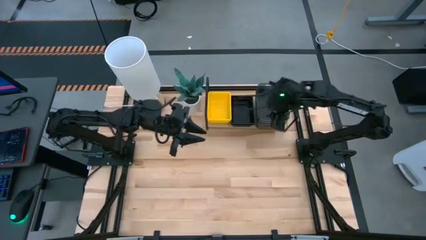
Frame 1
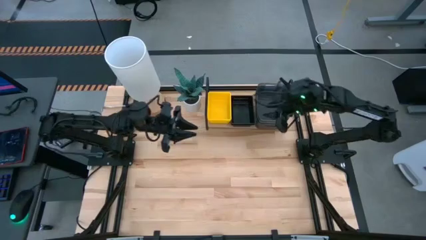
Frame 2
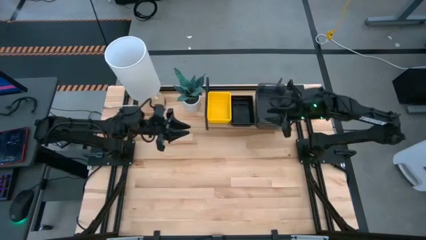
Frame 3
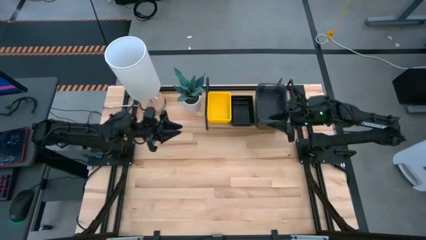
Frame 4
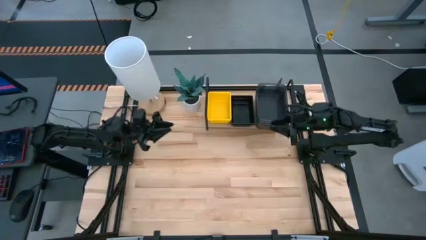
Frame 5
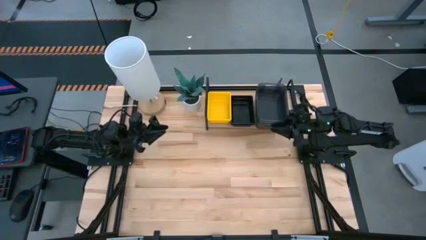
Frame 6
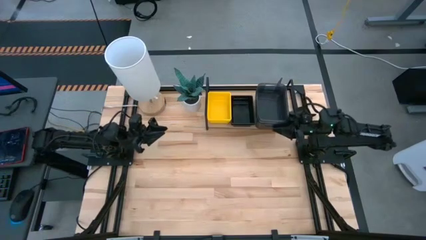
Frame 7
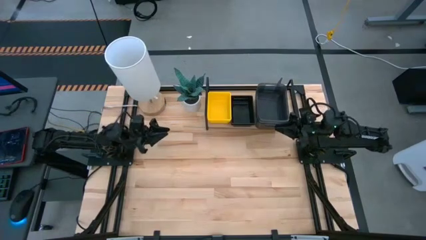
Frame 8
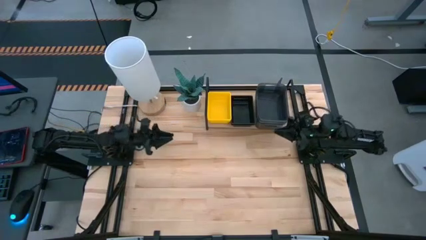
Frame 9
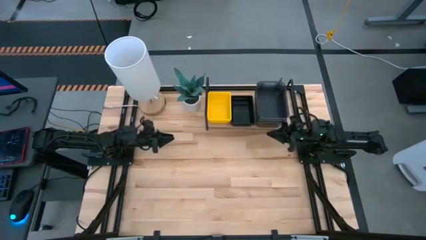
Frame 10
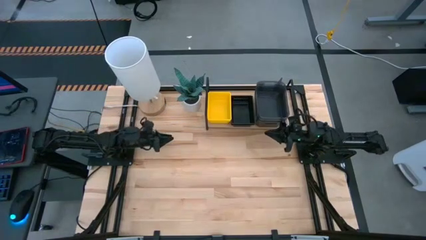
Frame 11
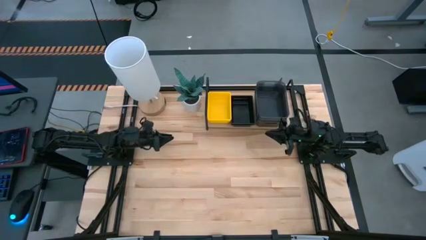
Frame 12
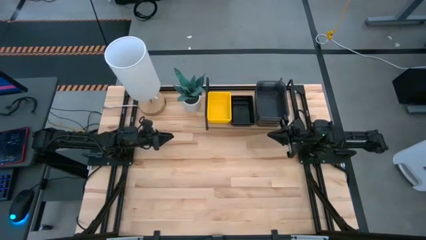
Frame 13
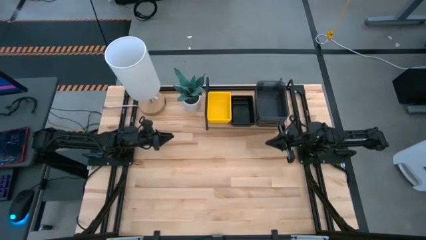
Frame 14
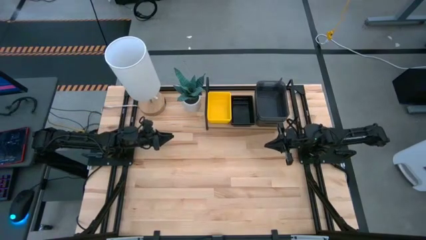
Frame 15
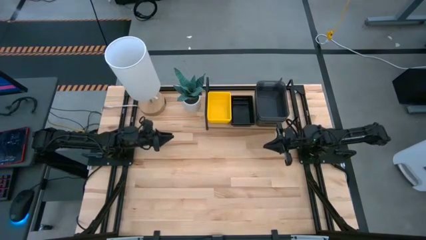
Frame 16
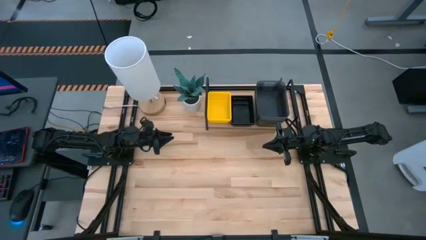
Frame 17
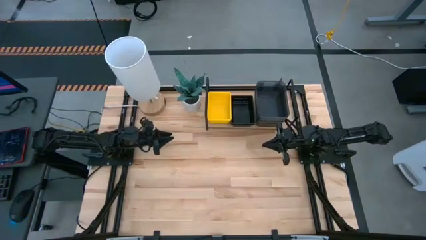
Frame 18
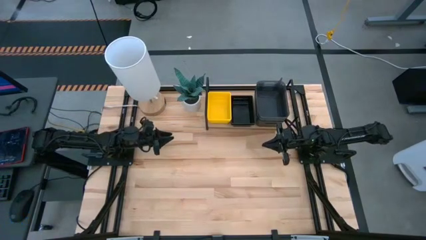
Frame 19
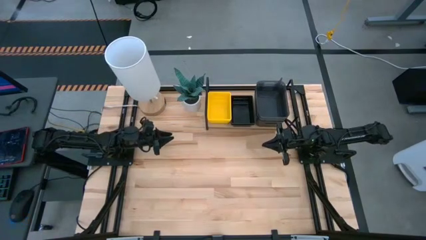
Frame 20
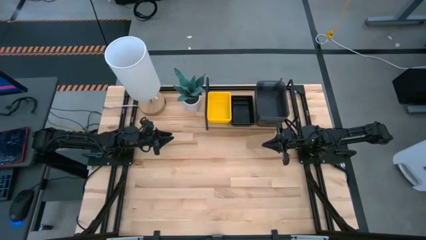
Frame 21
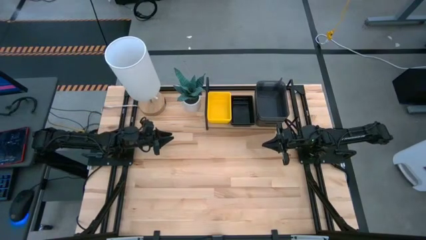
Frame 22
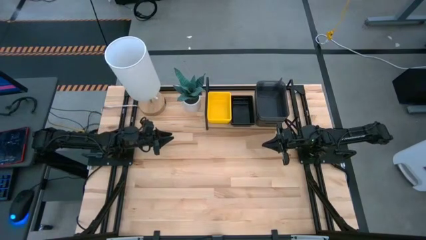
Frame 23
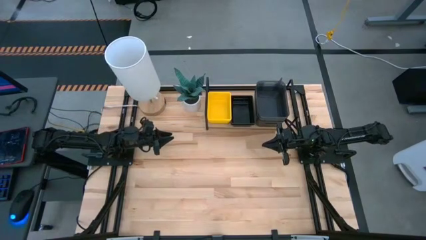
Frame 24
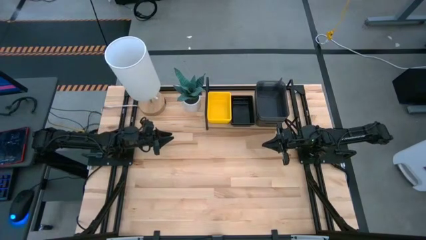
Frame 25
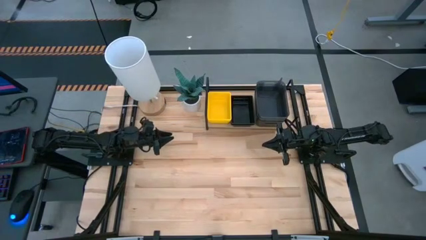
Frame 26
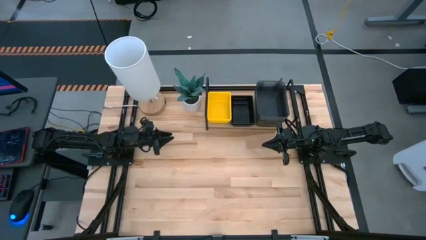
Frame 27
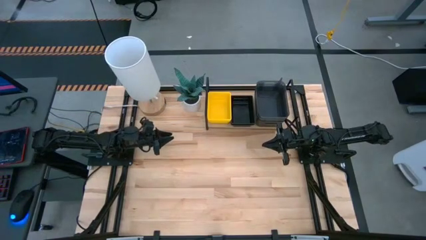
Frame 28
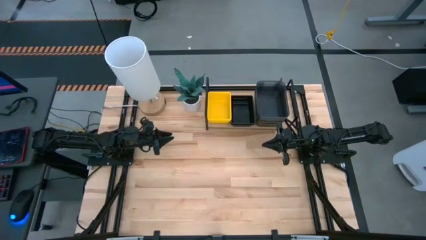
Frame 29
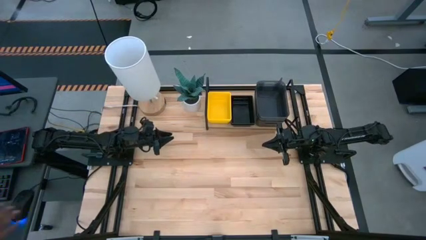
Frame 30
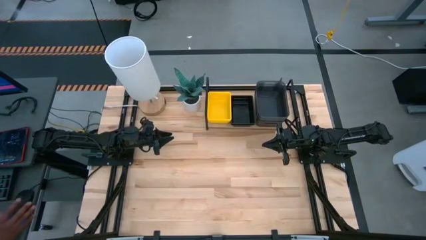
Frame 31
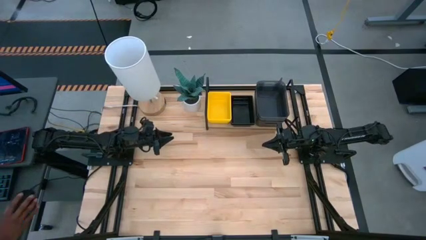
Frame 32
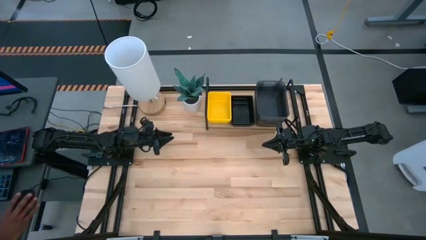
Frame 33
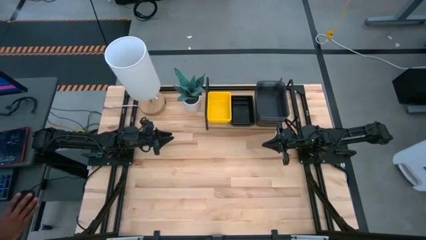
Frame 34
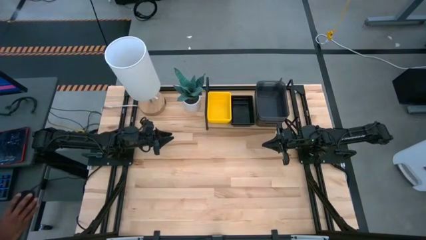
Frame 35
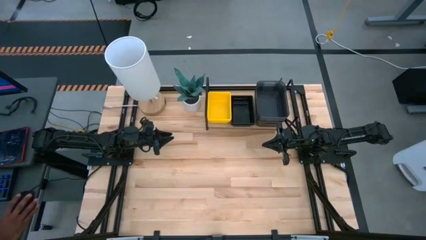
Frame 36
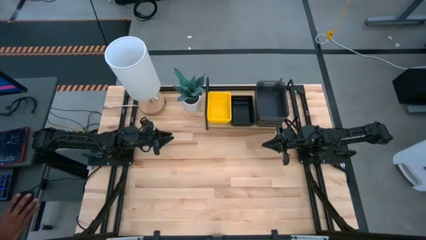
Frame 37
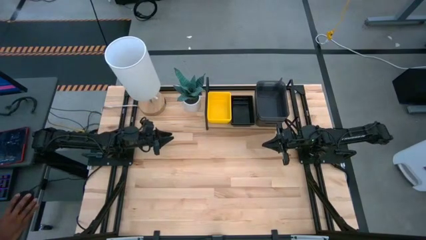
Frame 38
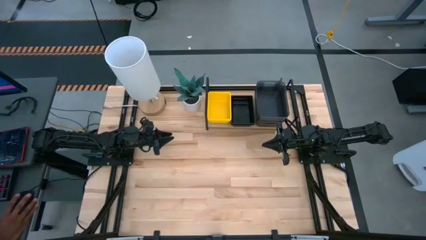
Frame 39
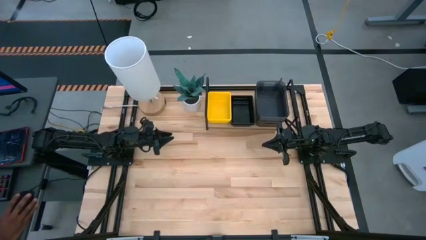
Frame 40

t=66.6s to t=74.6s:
Task: Stack baskets on shelf by color
Return to Home Position

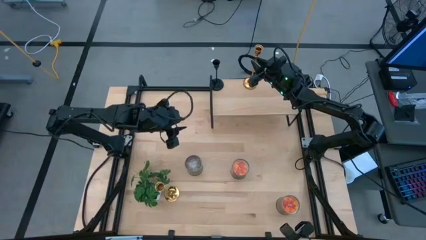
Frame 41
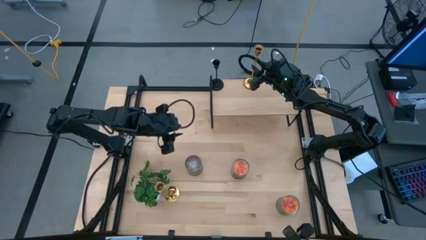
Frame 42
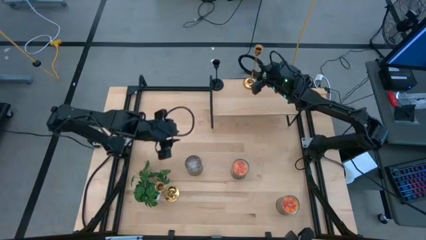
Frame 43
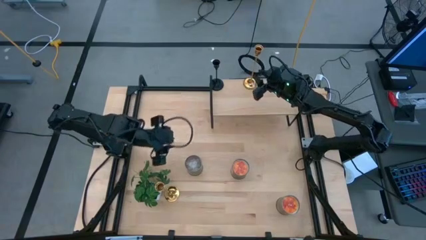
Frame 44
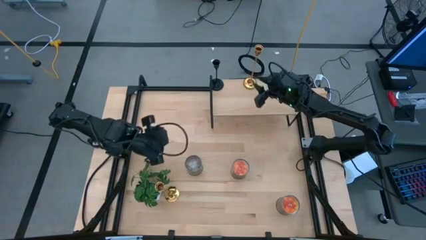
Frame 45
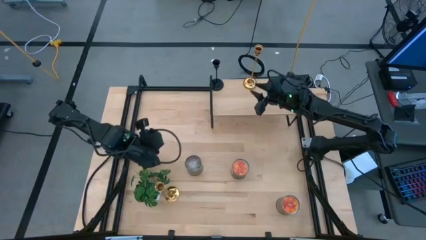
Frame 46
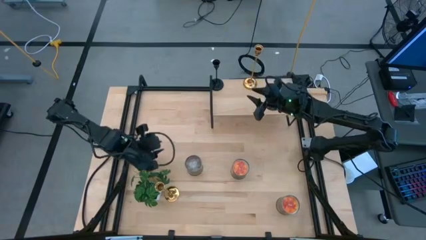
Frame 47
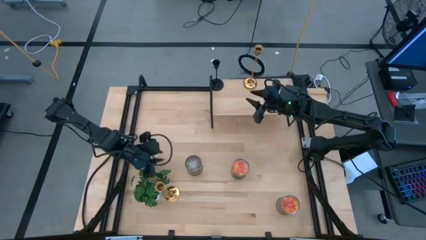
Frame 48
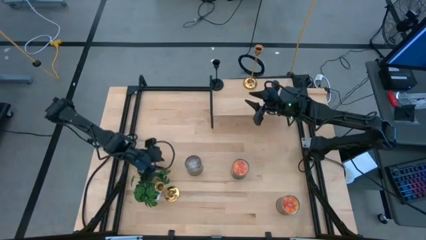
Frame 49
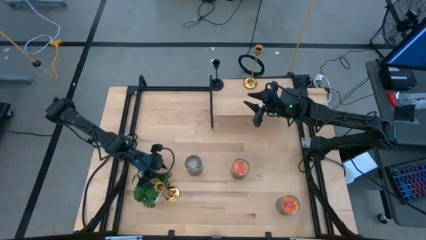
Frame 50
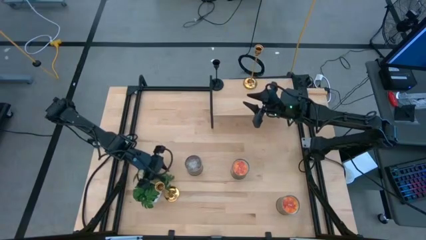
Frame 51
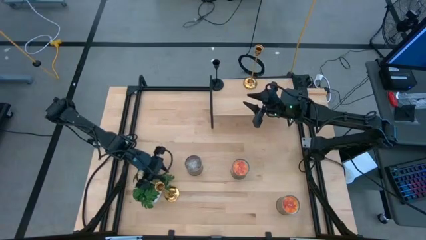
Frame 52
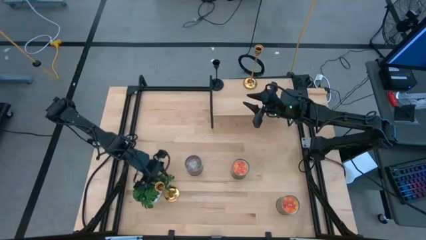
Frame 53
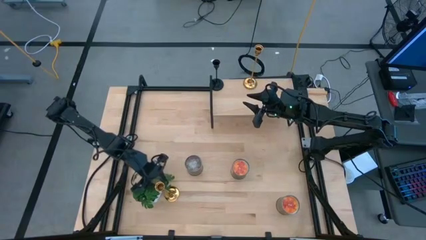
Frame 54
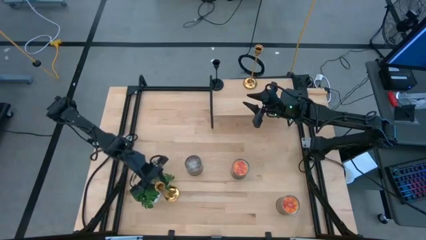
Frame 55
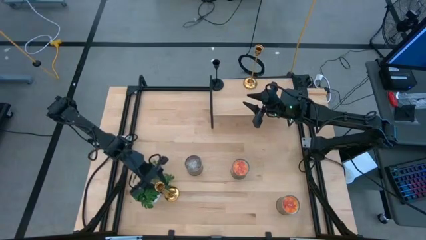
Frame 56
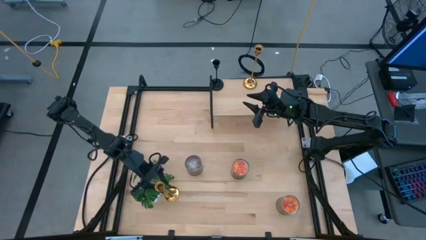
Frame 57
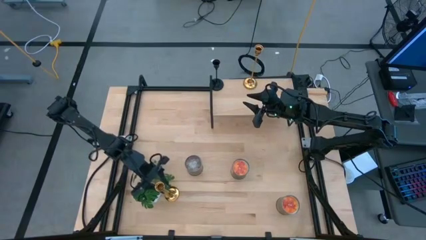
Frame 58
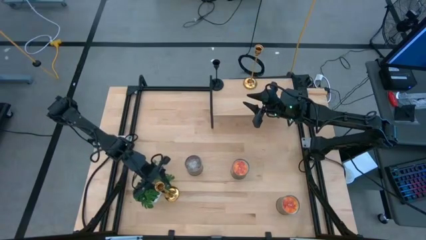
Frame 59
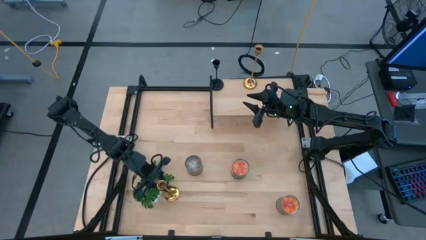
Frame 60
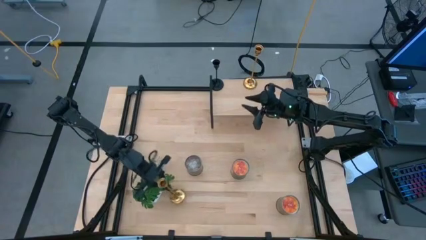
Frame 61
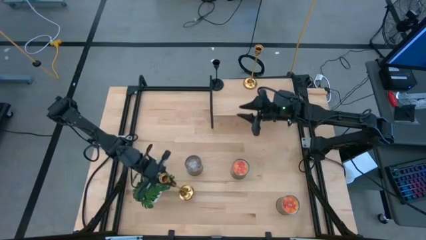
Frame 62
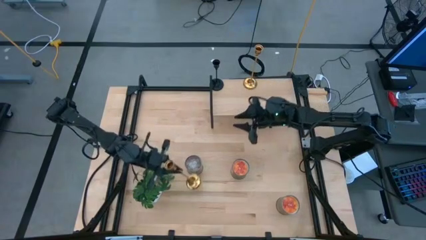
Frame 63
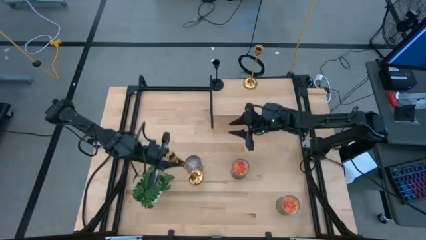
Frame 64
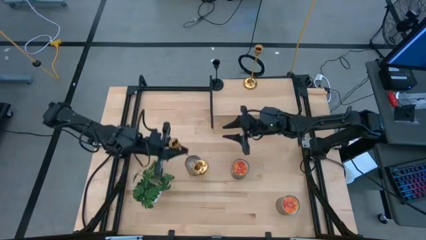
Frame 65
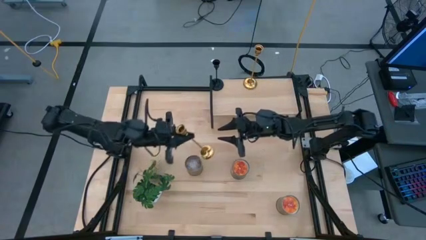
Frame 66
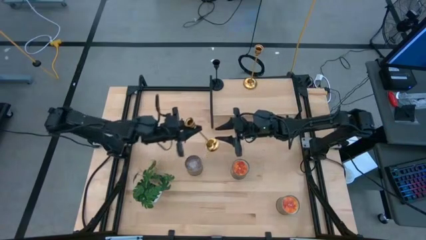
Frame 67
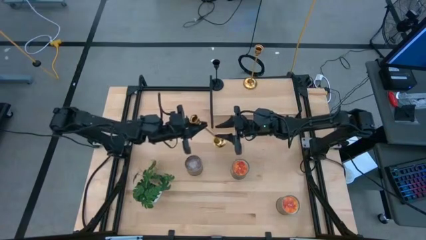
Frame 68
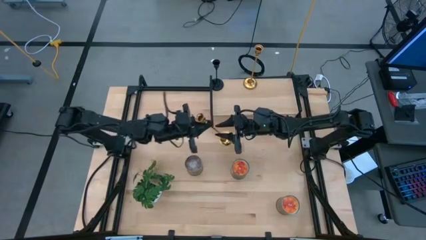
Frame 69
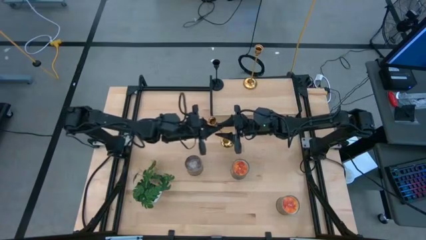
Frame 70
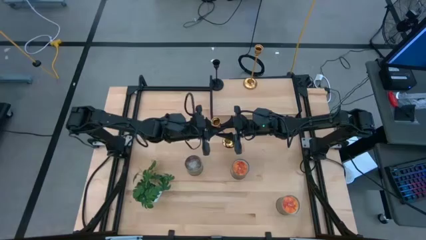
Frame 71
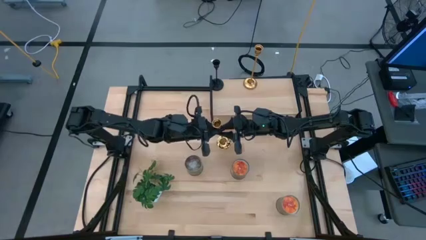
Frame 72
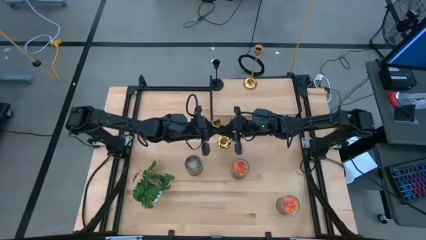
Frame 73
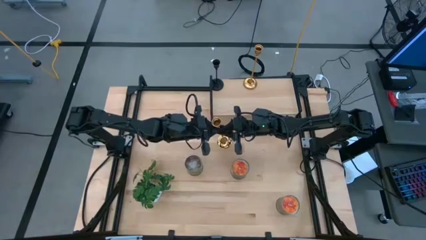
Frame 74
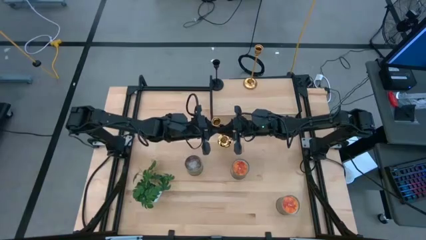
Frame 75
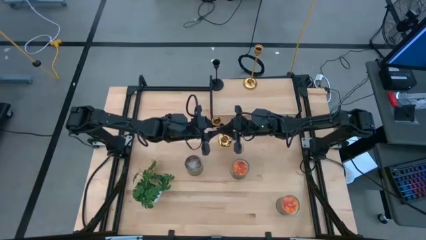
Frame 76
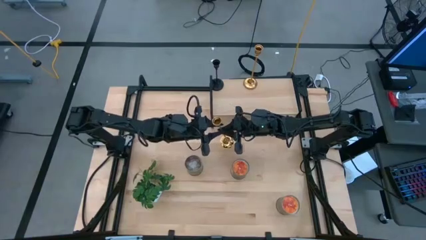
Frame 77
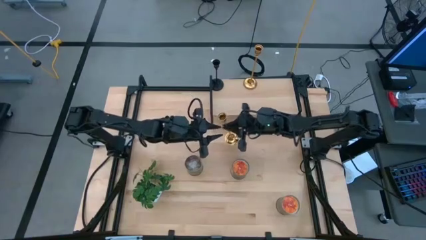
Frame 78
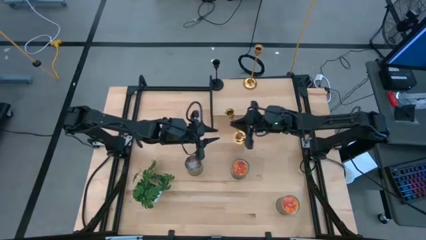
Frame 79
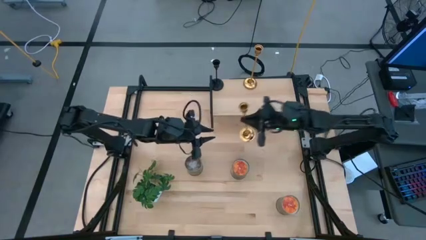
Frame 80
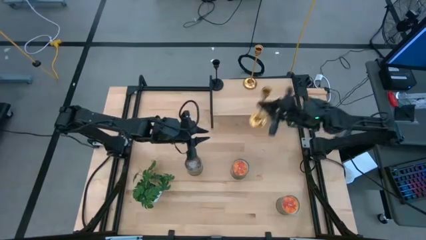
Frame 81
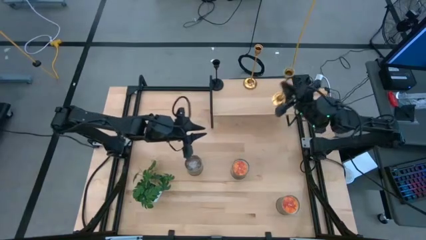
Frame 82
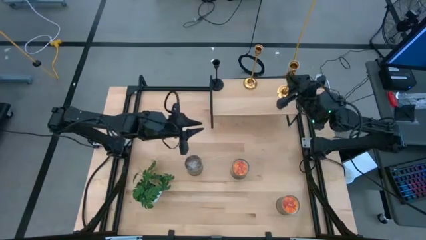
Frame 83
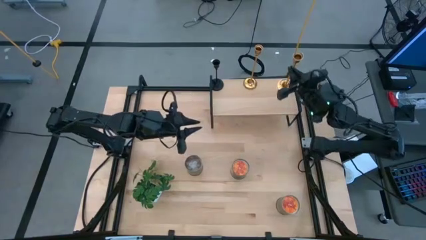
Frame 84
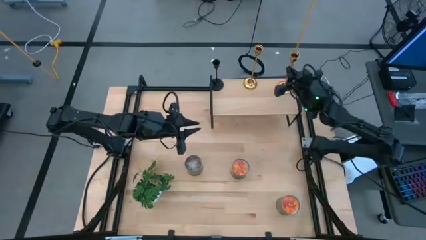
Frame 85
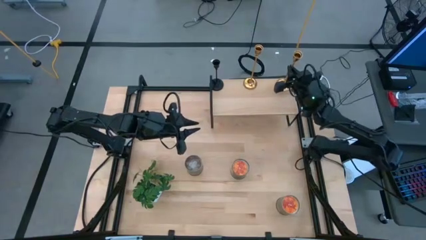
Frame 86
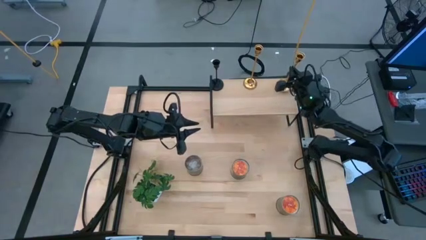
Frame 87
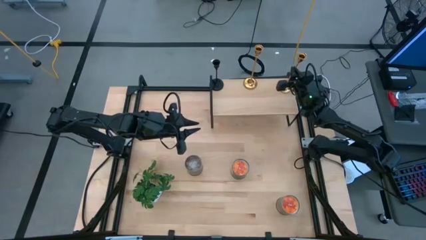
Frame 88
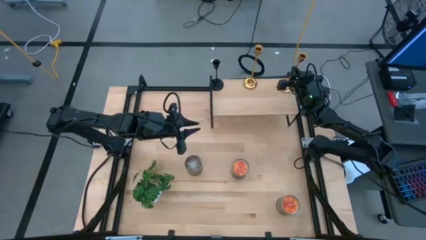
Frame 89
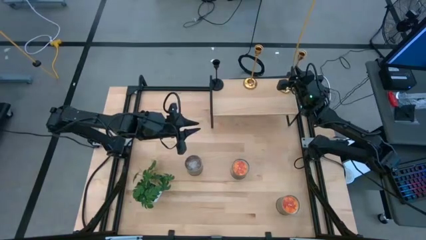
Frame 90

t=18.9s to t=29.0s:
Task: Pick & Place candle stick holders
Put the gold candle holder on the shelf
